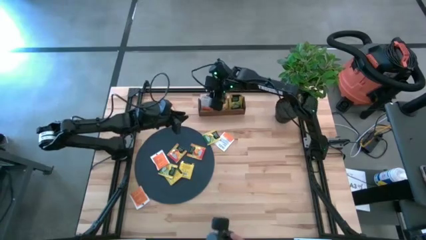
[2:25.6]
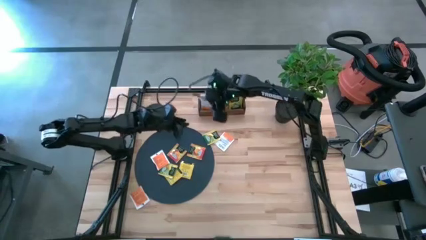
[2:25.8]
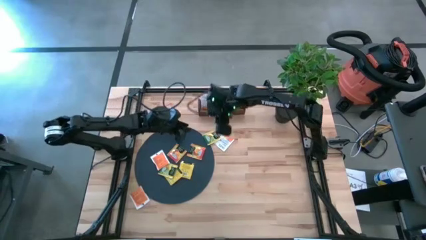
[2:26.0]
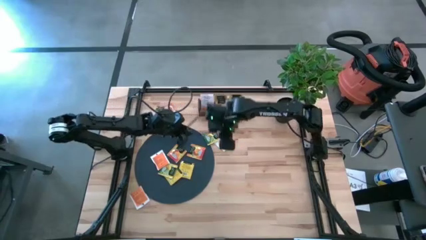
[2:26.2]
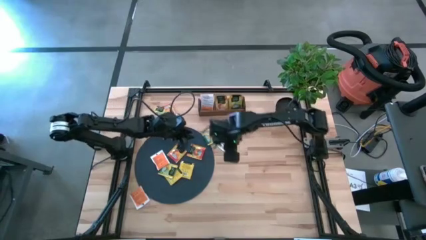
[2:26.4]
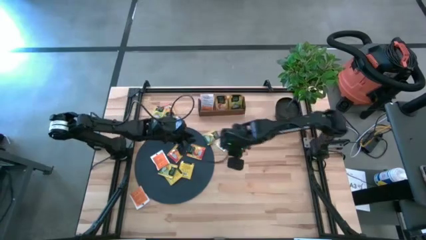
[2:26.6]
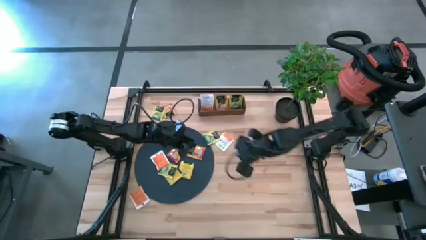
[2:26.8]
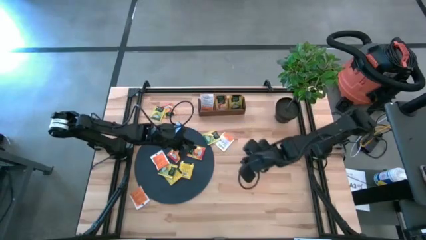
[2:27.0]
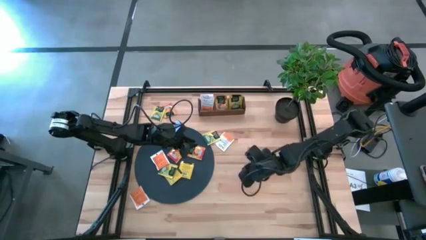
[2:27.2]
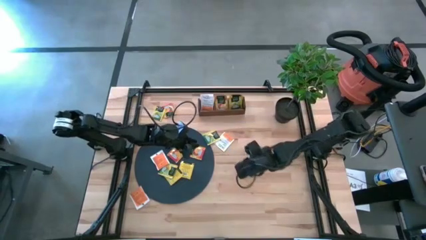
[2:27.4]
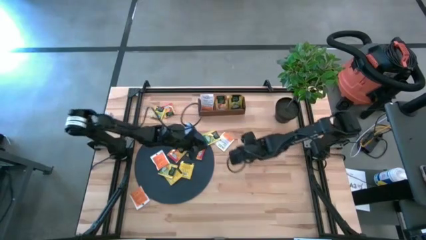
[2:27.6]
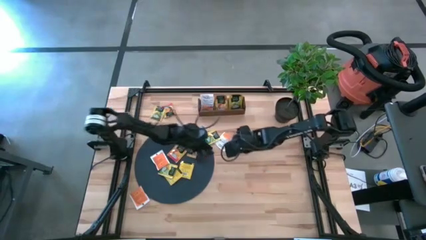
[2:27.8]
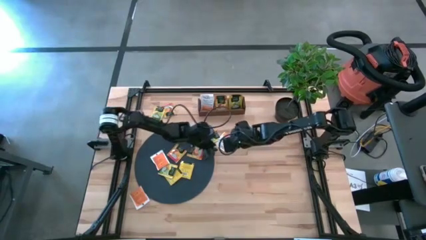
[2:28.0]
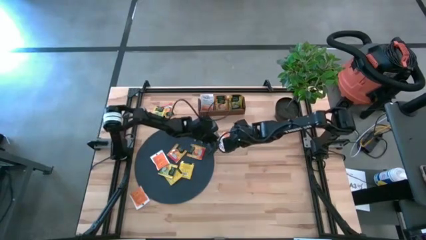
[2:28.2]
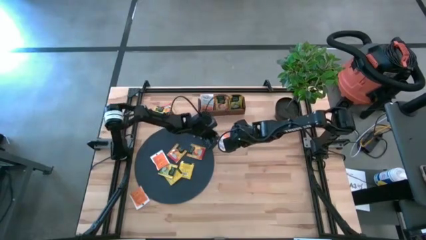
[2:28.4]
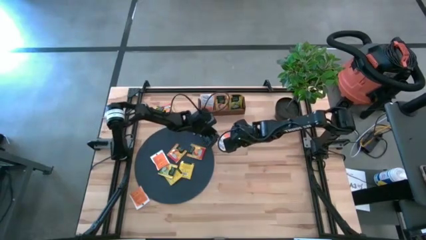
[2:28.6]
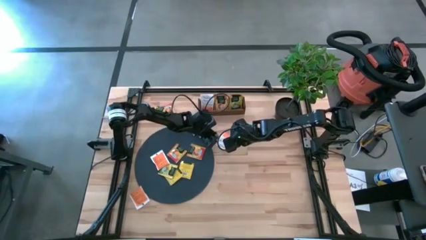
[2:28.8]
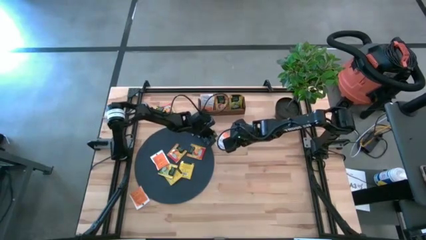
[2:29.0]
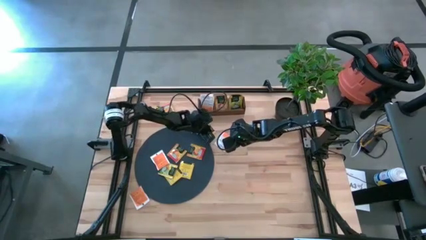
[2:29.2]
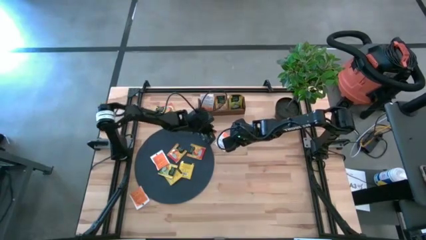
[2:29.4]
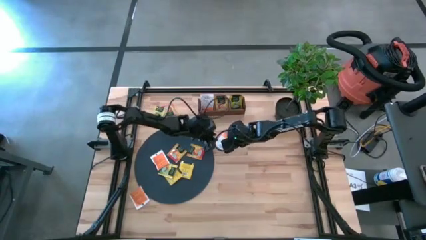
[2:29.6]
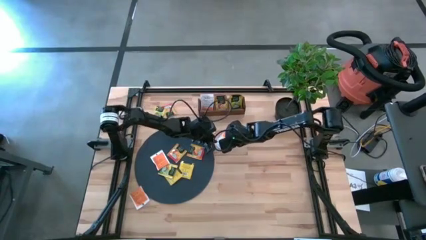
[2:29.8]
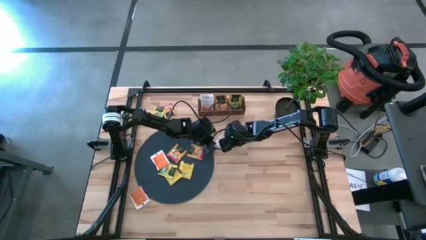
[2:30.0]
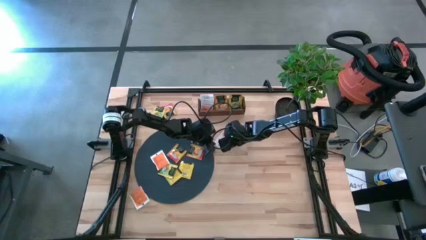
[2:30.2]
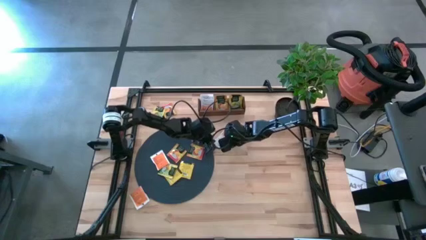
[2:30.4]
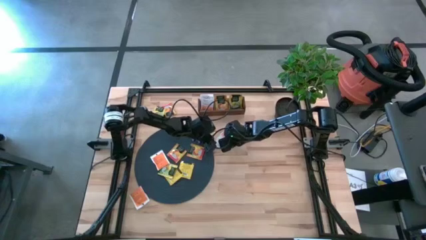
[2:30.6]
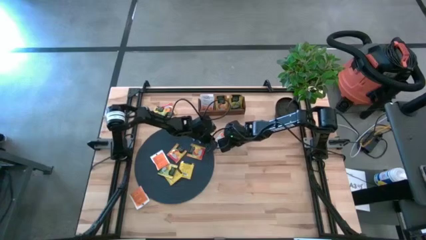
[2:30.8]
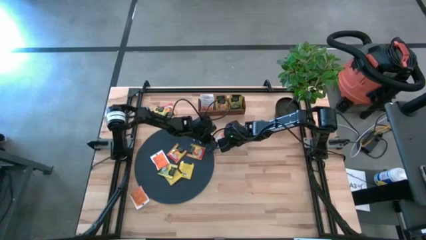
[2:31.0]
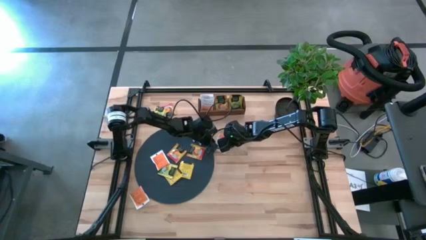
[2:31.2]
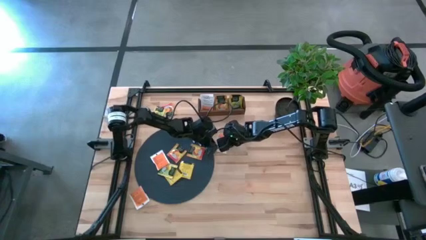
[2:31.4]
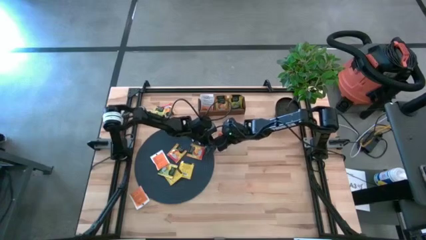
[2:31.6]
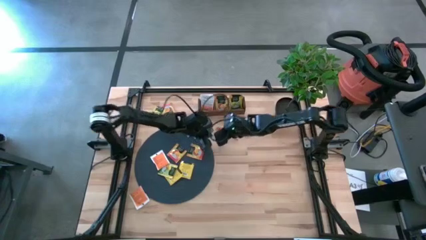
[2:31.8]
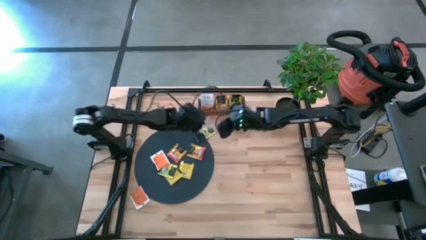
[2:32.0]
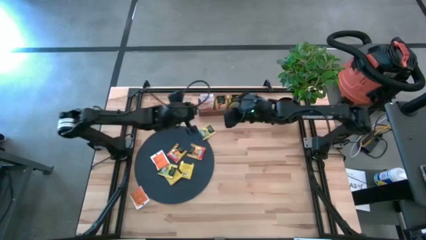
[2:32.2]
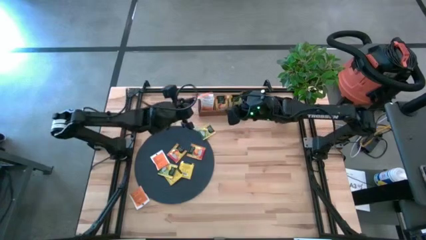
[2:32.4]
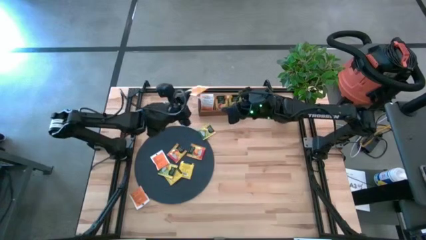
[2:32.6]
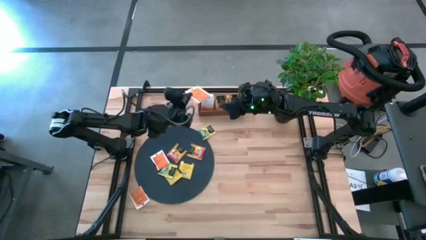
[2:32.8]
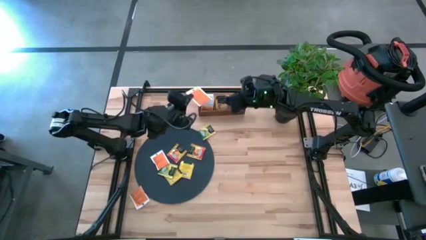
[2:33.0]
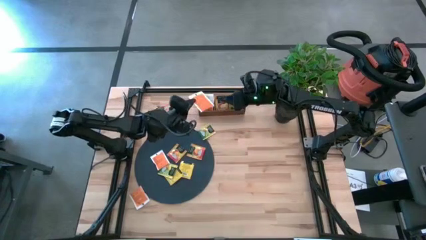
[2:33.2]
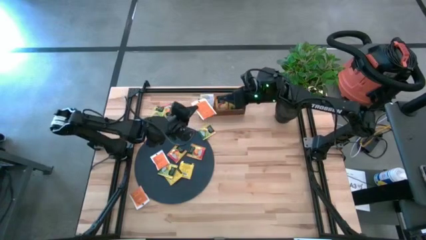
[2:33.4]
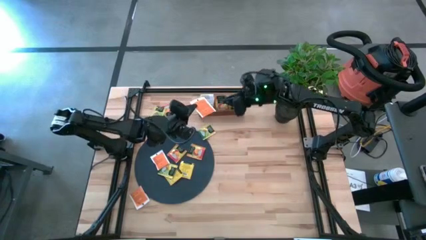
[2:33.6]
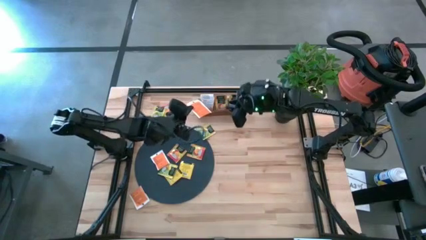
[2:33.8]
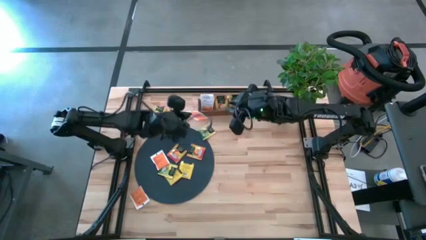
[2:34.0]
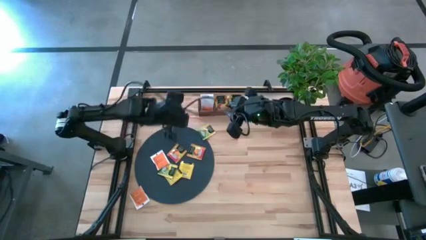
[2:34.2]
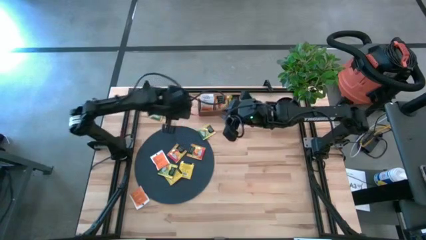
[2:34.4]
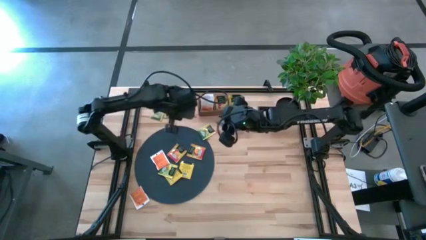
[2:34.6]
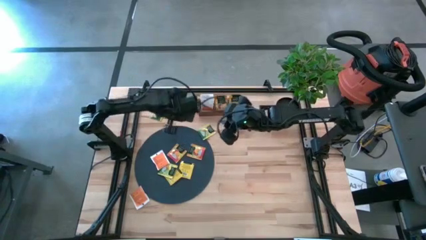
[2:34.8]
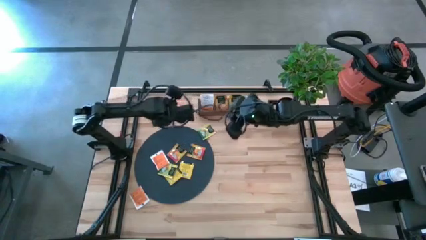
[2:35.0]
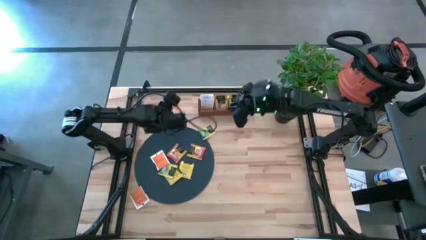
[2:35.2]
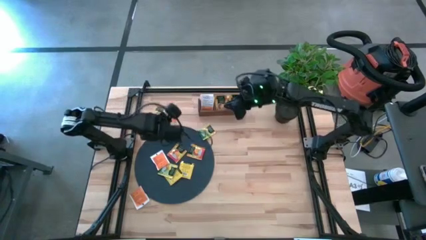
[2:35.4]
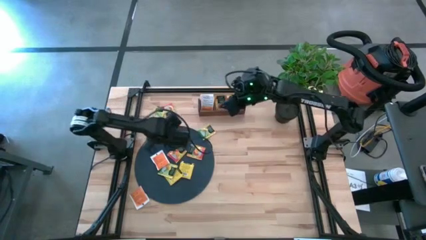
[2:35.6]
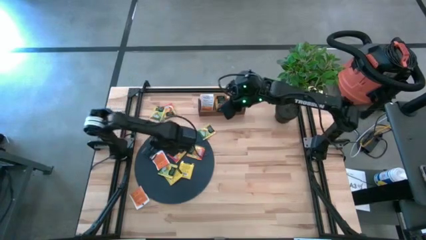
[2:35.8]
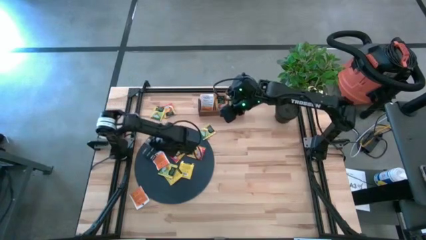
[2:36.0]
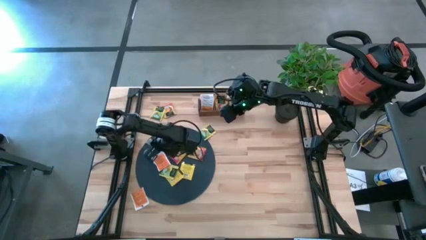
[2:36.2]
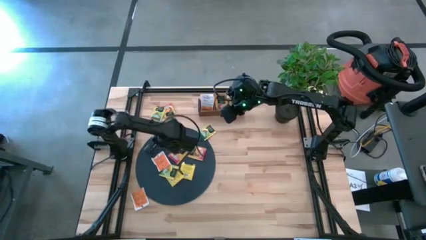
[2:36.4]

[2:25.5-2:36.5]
Task: Pick & Place Tea
Put the orange tea bag into the left section of the wooden organizer

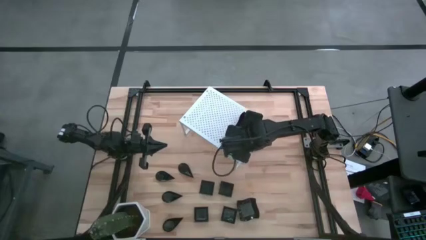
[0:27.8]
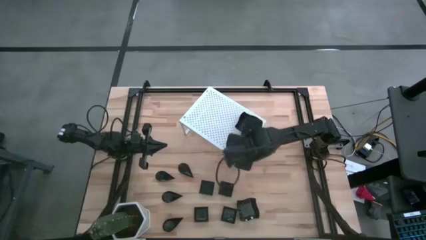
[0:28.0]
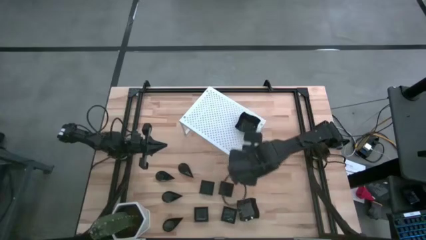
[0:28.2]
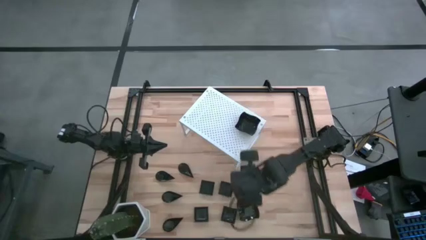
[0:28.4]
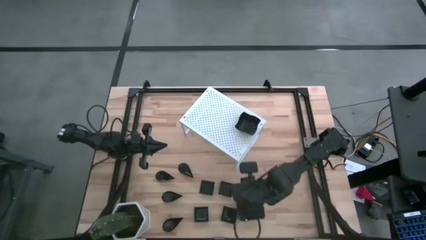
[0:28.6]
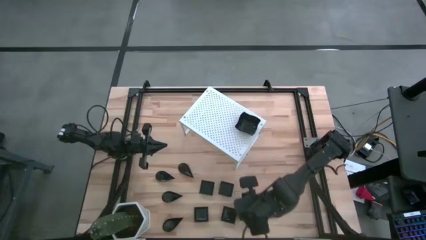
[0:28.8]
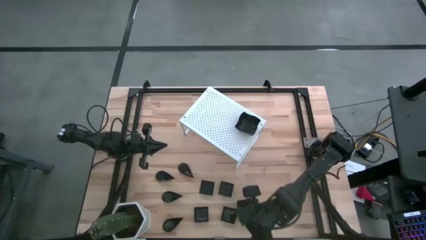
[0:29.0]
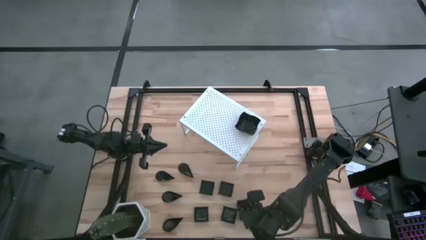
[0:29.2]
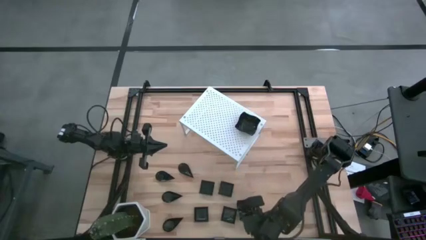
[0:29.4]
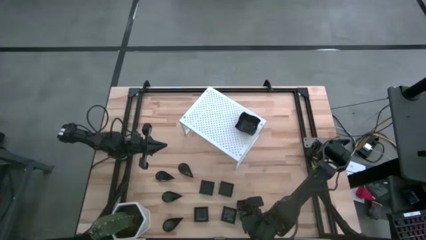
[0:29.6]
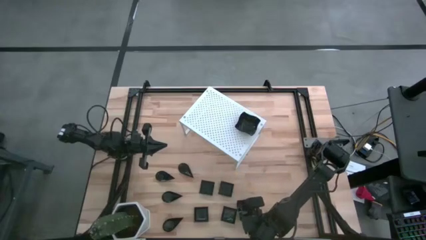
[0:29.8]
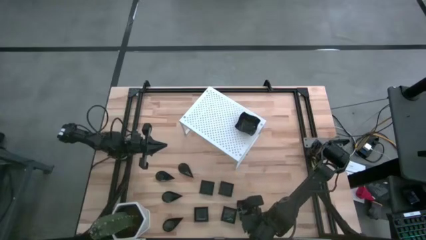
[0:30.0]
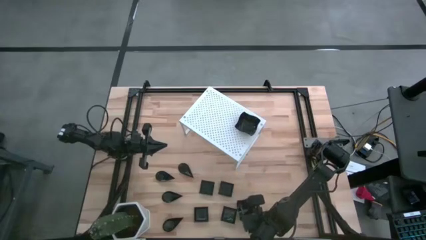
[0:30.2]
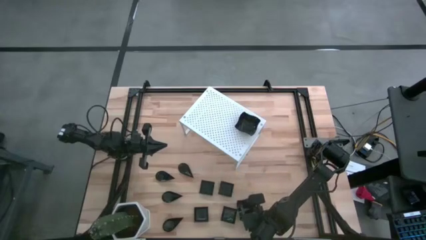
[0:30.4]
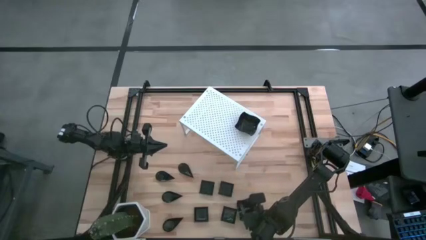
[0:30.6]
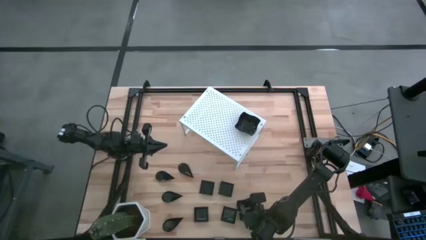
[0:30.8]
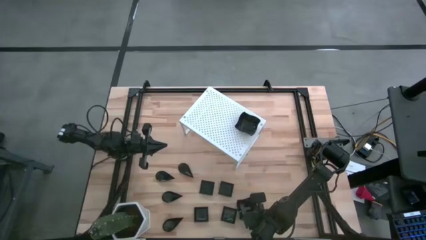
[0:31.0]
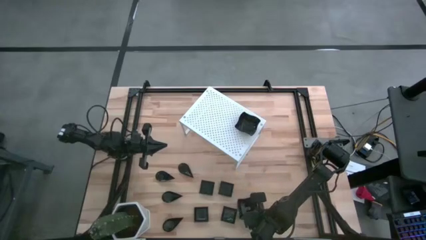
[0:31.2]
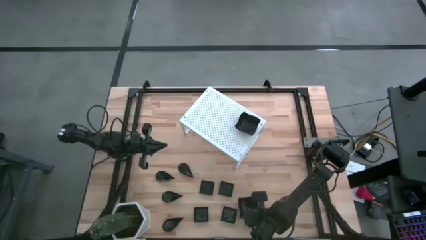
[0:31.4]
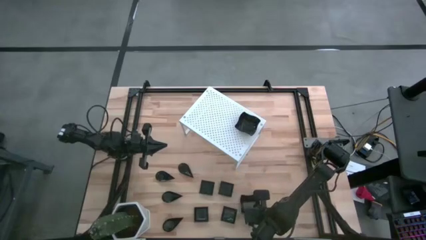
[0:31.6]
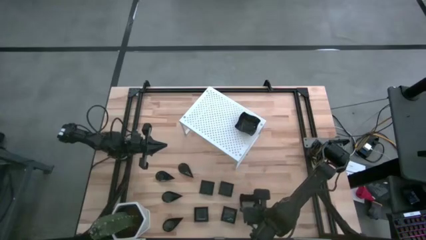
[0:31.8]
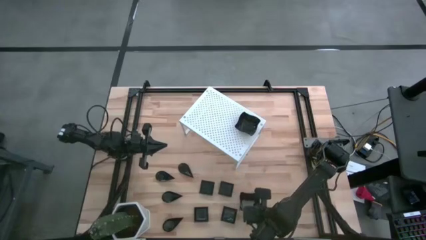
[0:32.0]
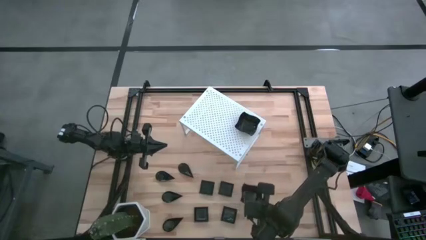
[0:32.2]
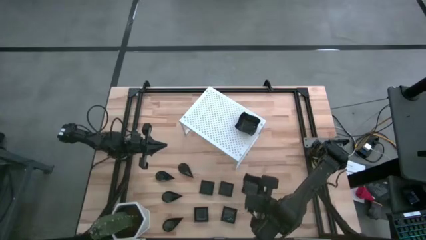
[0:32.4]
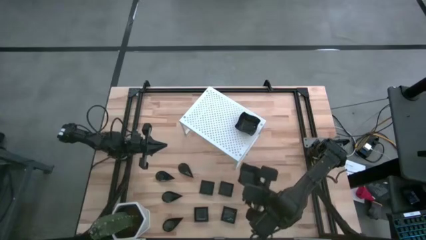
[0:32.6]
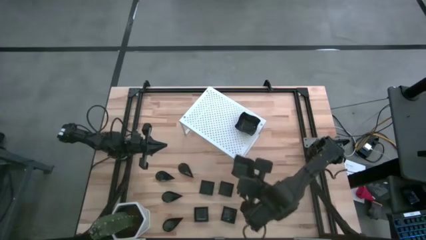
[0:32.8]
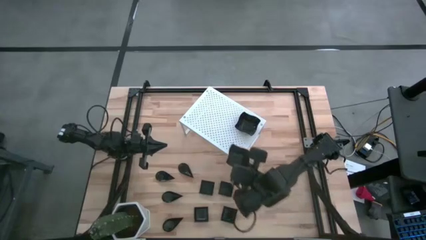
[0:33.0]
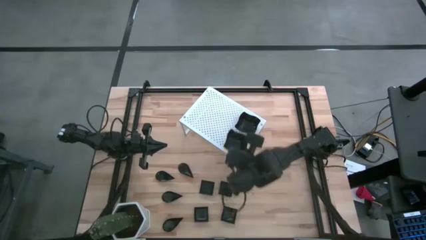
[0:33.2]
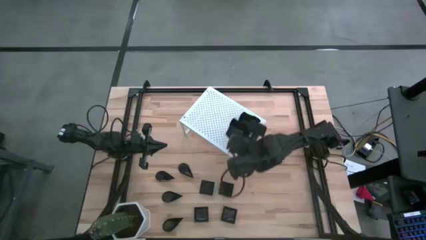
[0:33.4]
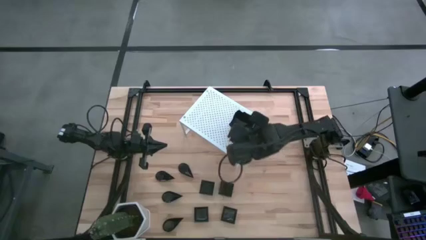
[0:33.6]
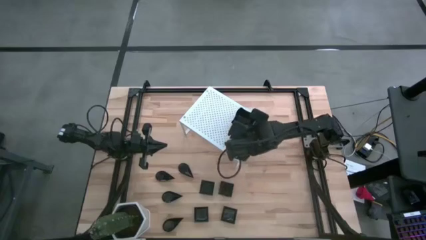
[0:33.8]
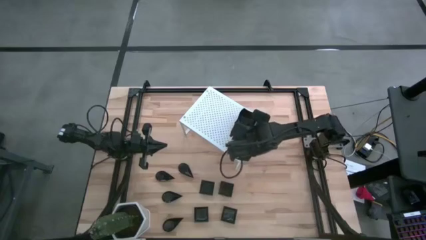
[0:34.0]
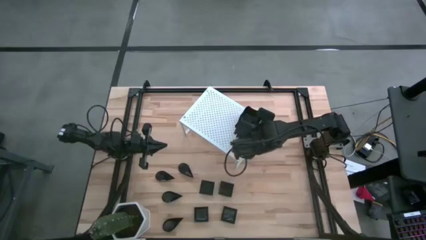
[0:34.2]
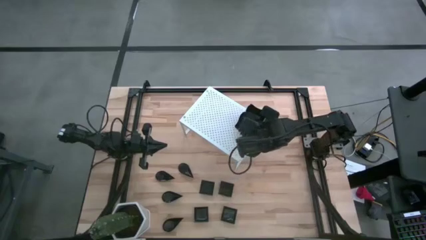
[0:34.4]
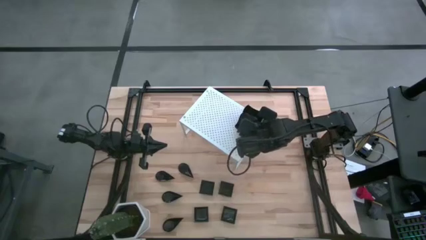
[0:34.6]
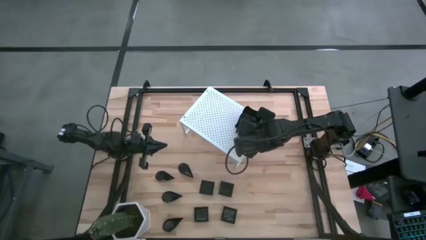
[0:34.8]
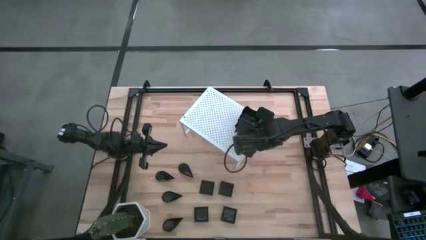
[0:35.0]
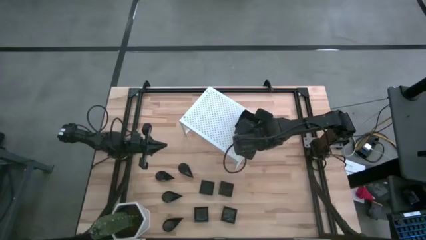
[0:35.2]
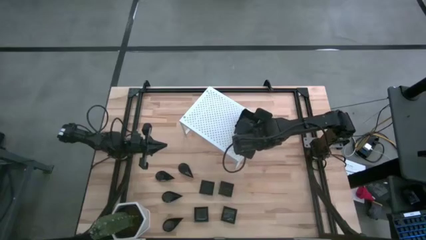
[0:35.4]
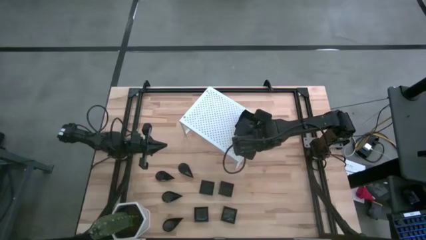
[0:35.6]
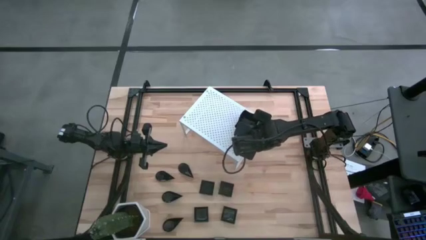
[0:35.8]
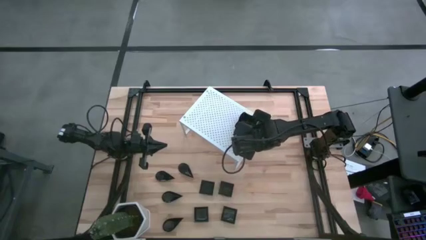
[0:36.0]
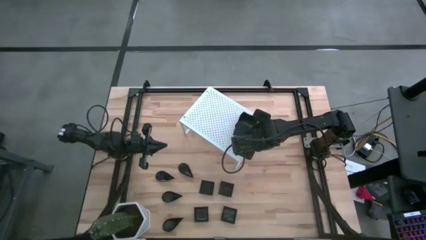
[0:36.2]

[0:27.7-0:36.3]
Task: Pick & Place Mini shaped plates
Stack the distorted square plate on top of the other distorted square plates on the shelf
